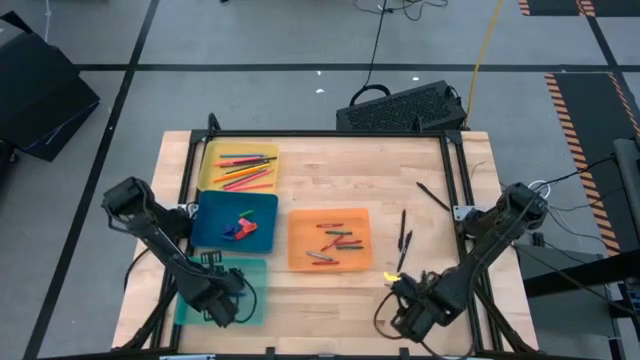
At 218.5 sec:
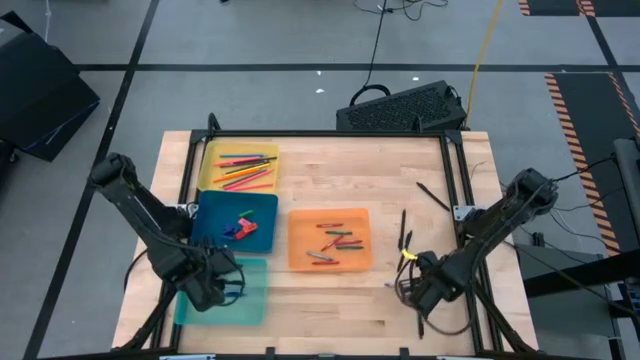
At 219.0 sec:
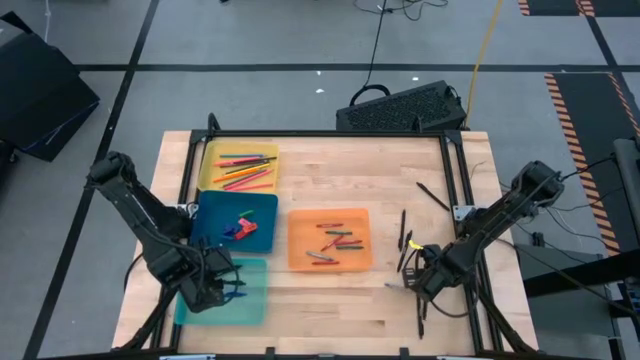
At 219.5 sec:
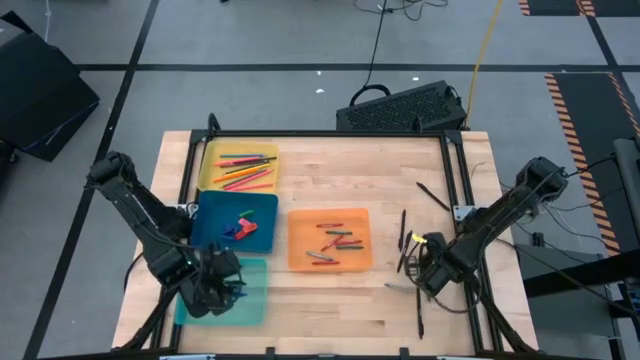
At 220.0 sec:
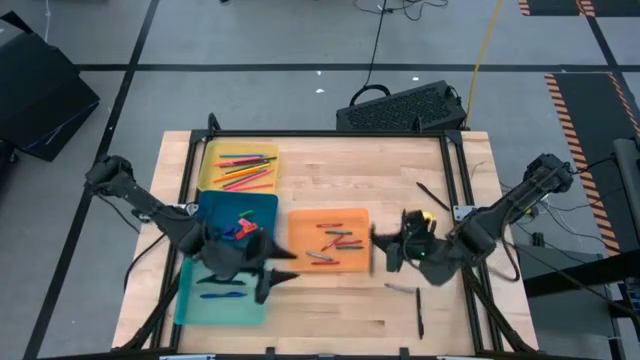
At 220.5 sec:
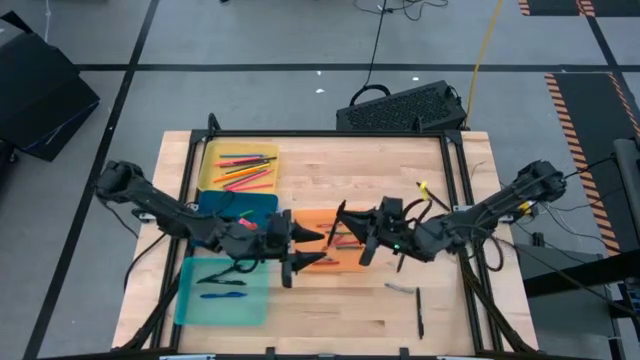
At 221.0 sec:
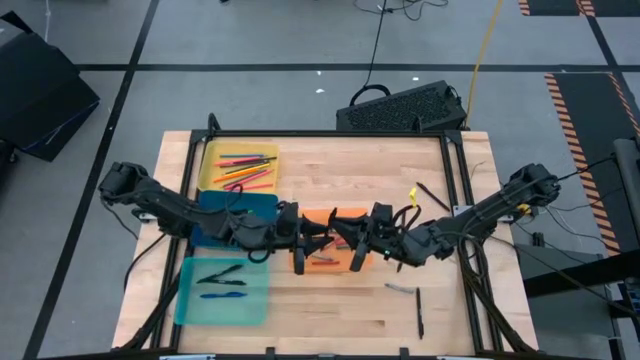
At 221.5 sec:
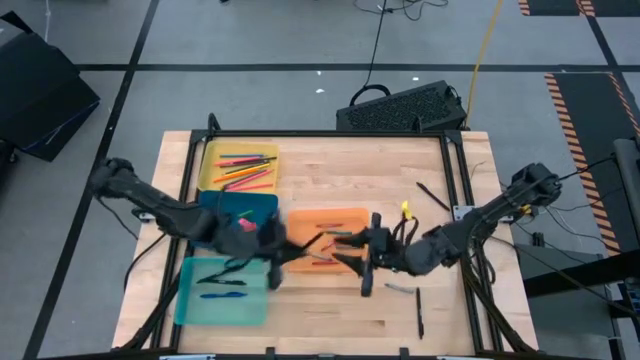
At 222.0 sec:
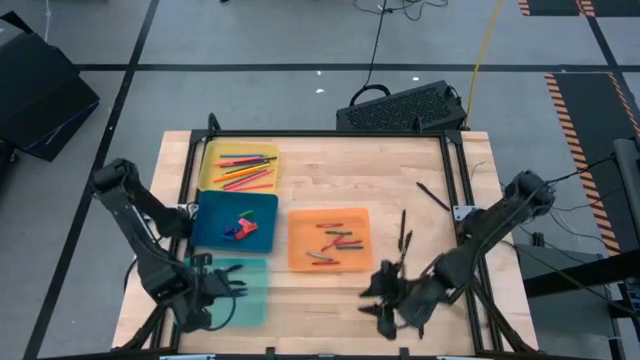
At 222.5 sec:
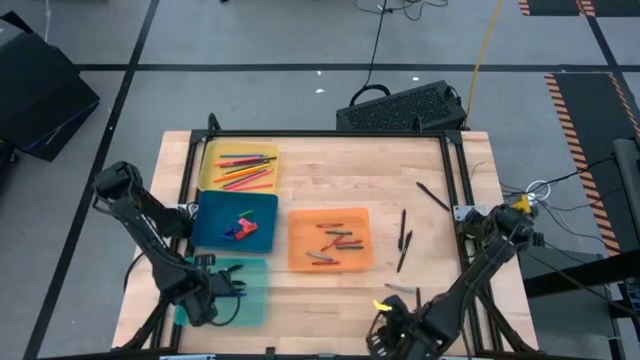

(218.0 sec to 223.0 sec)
Task: Sort crayons/erasers/pens/pencils in bins
Put the black pen into the green bin

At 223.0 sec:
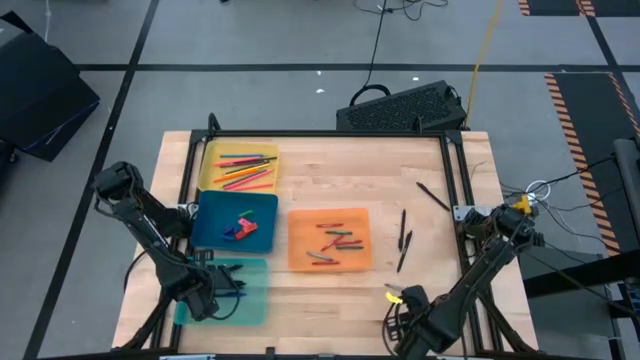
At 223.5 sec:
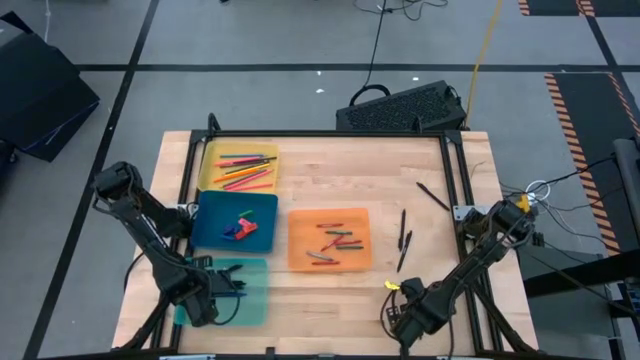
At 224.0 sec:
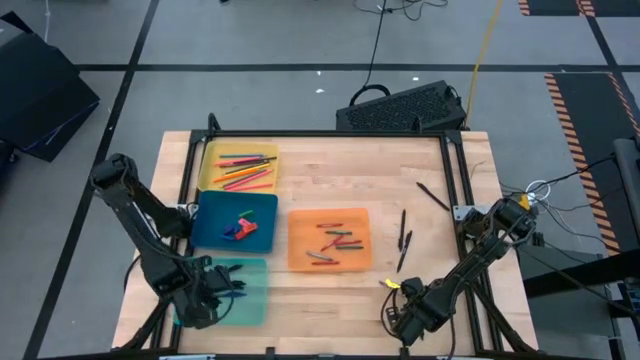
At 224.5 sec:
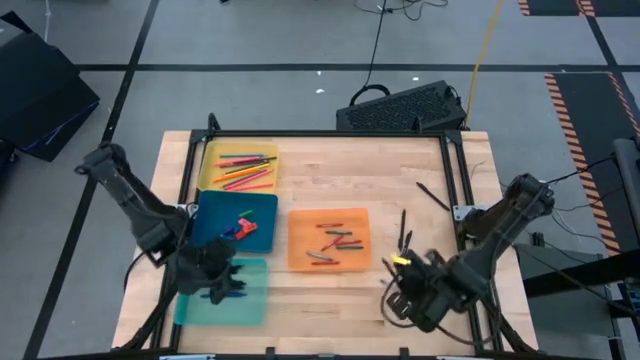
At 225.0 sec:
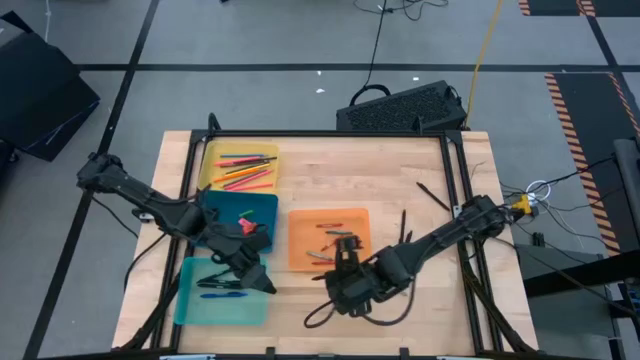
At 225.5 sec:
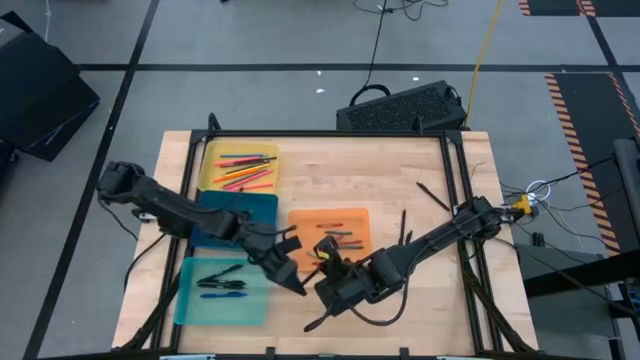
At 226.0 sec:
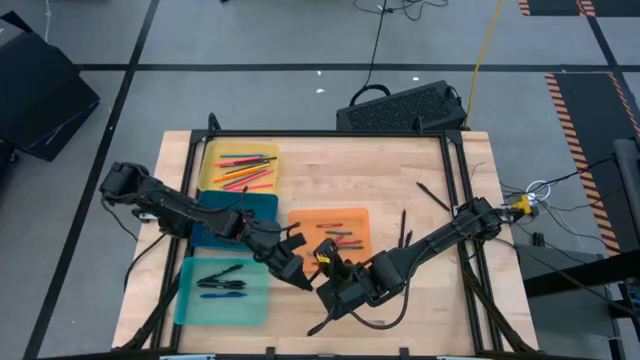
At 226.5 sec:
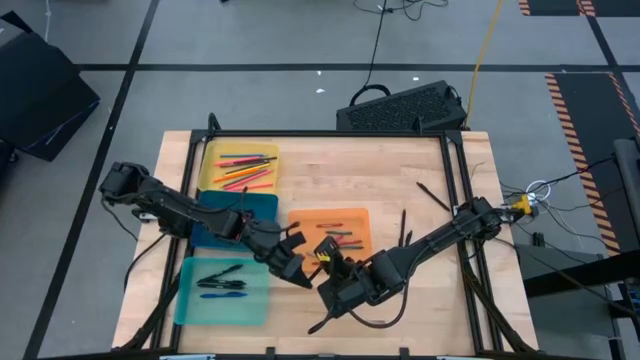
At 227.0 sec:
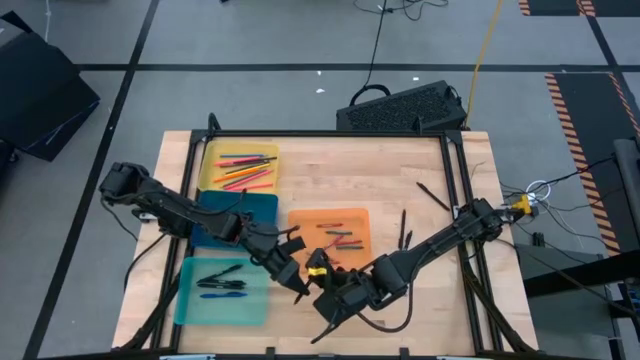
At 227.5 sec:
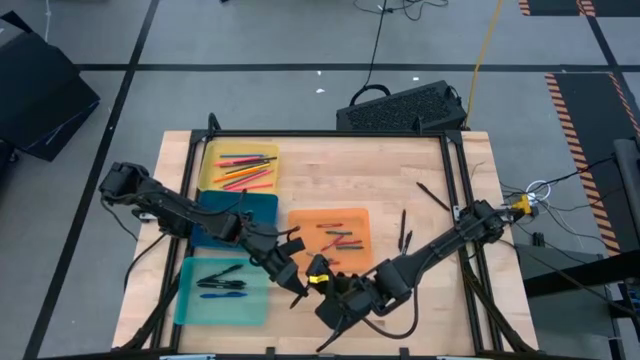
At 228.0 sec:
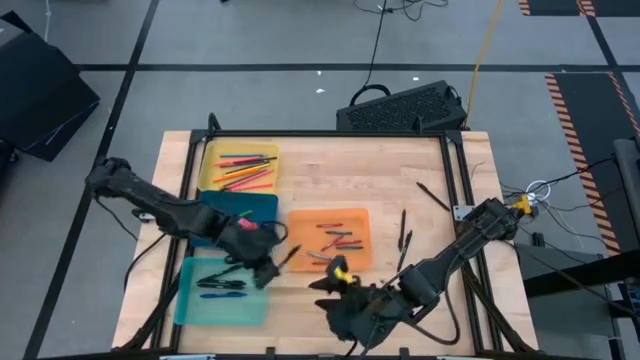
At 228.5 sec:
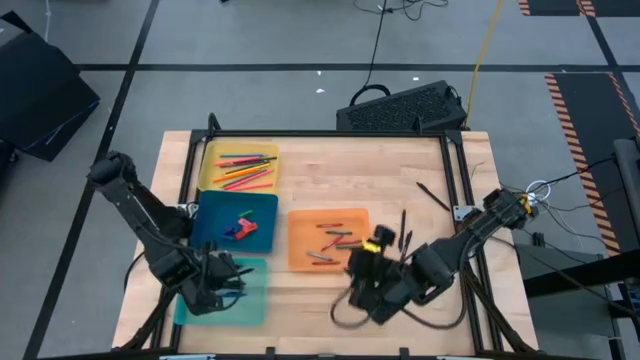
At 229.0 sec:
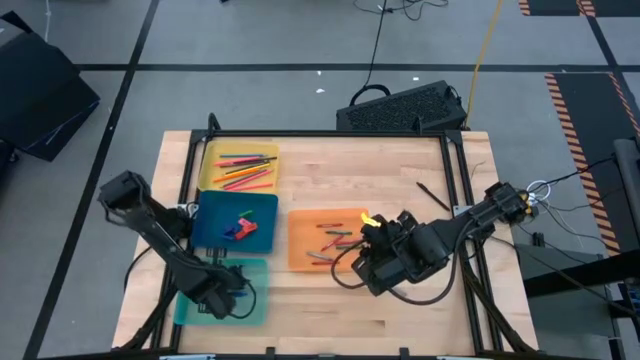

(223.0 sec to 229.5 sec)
Put the black pen into the green bin

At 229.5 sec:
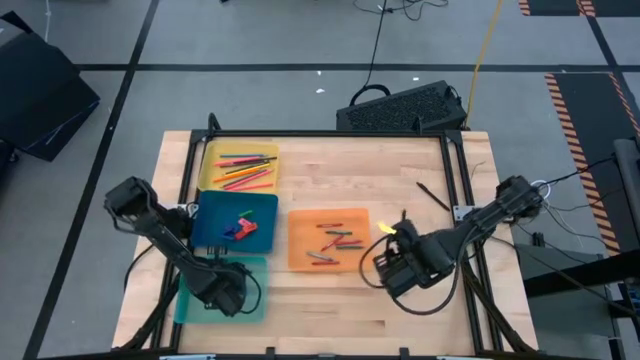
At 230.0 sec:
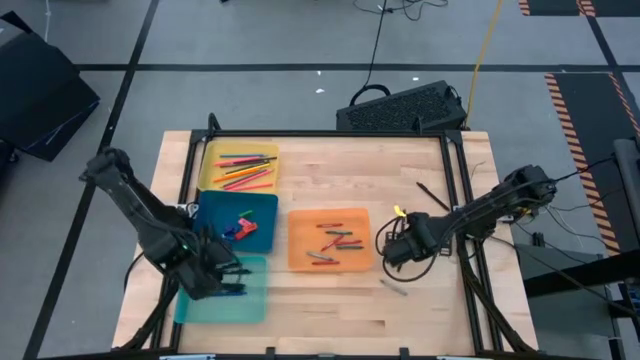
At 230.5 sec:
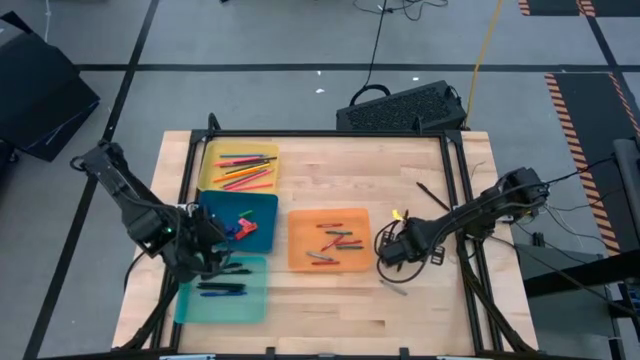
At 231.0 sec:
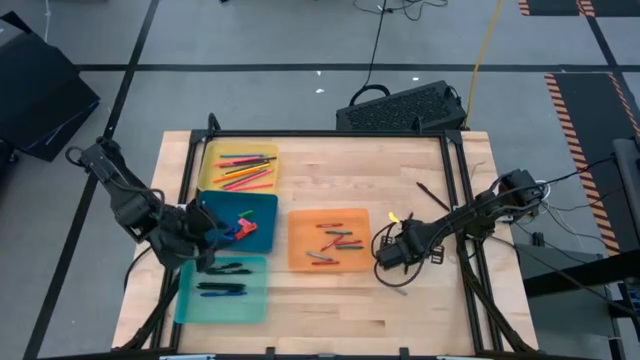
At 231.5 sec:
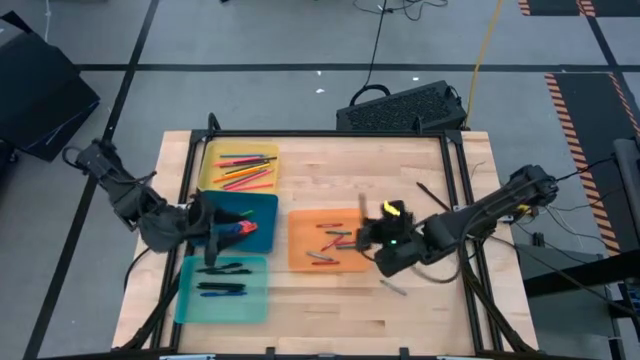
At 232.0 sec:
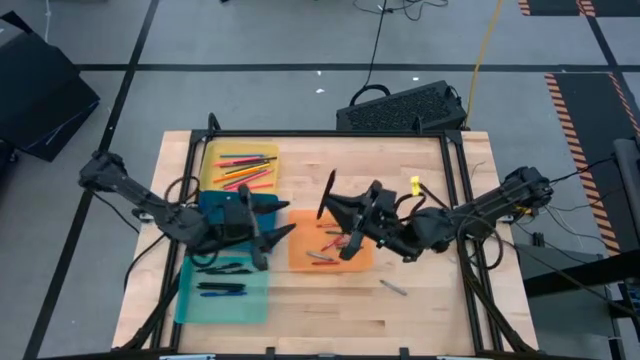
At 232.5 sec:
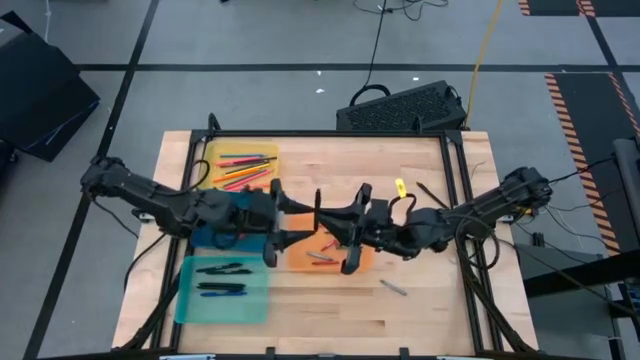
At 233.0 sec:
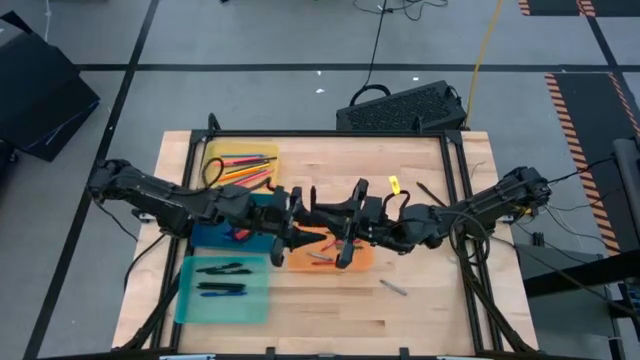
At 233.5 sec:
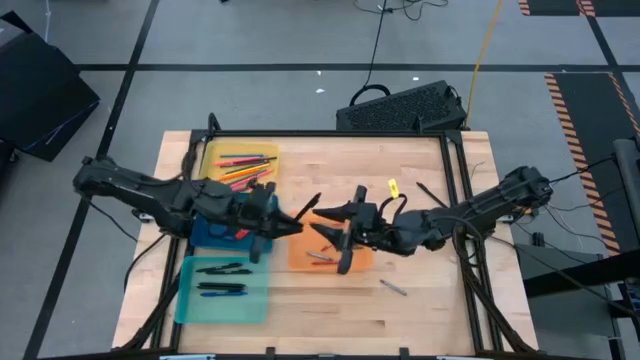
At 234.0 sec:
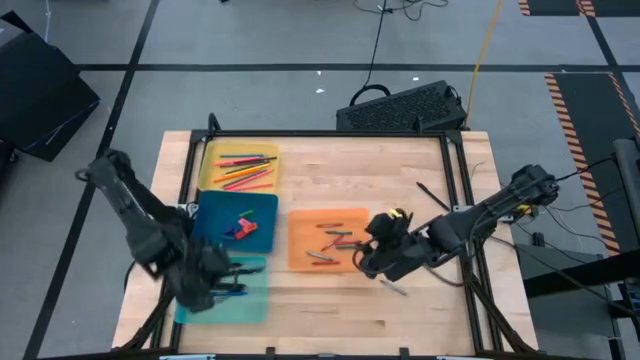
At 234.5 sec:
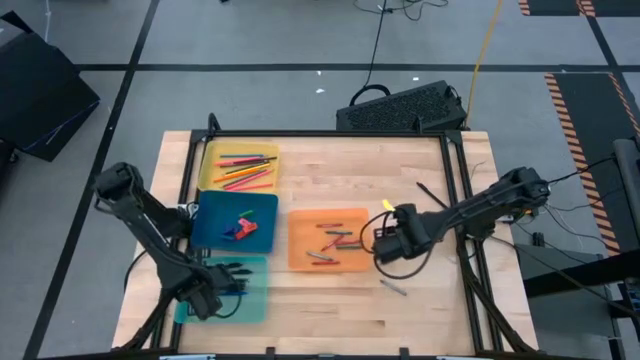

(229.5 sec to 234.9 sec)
Put the black pen into the green bin

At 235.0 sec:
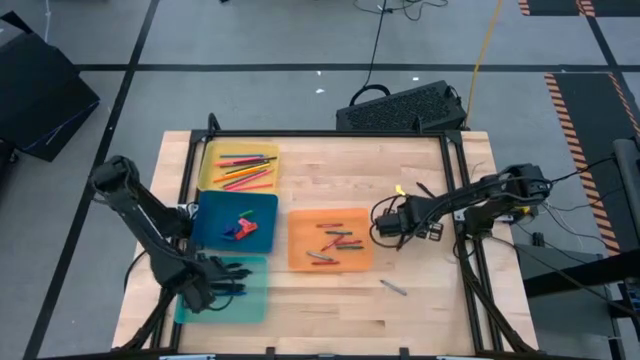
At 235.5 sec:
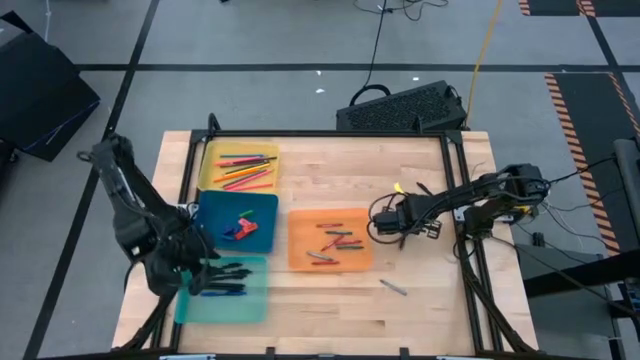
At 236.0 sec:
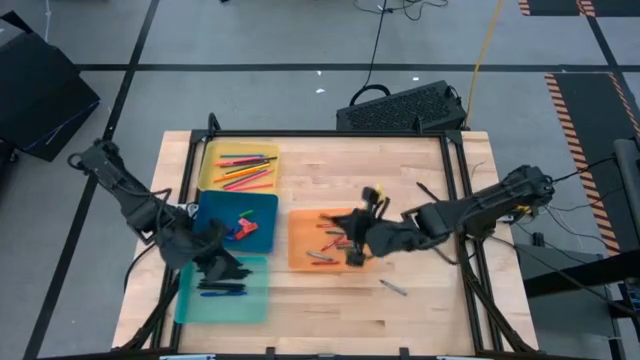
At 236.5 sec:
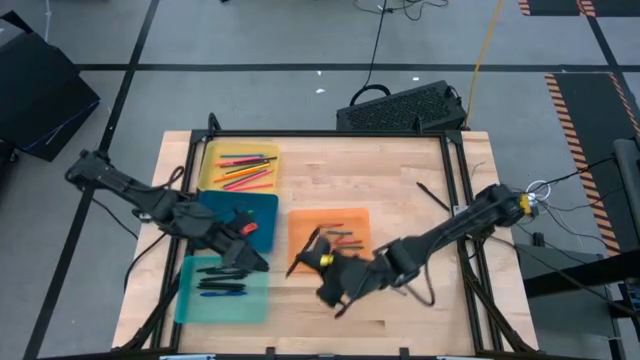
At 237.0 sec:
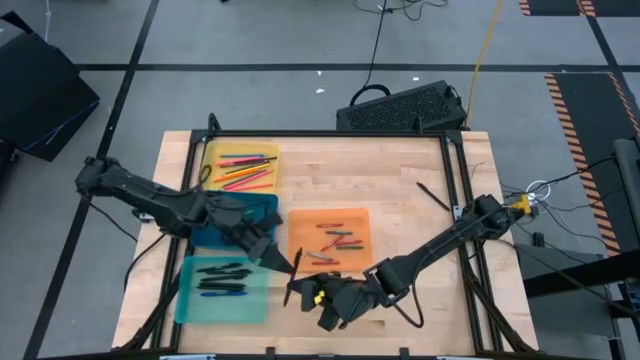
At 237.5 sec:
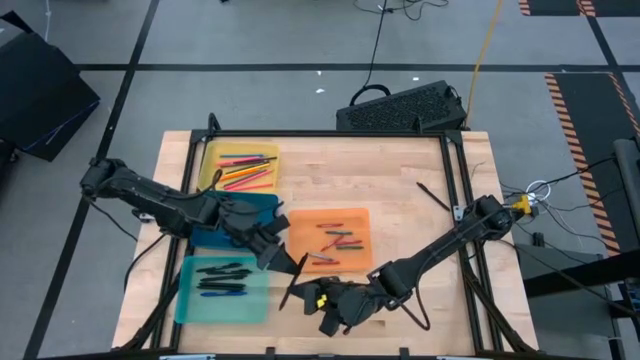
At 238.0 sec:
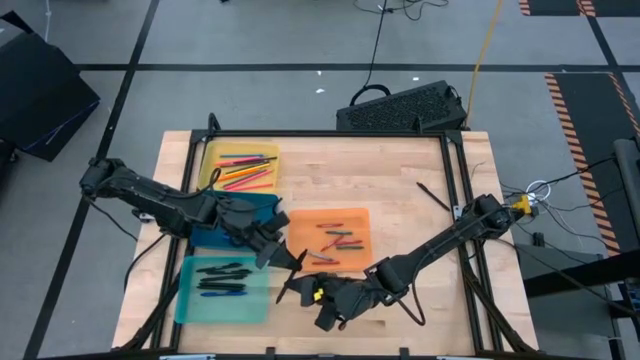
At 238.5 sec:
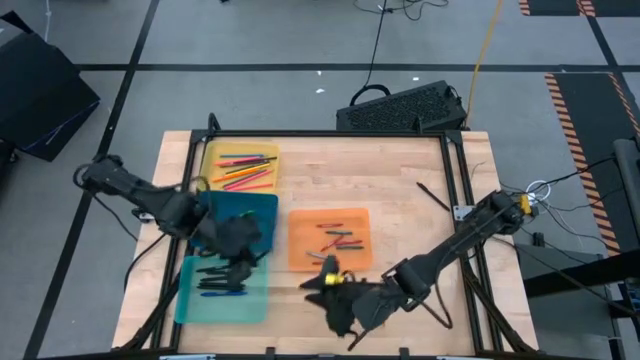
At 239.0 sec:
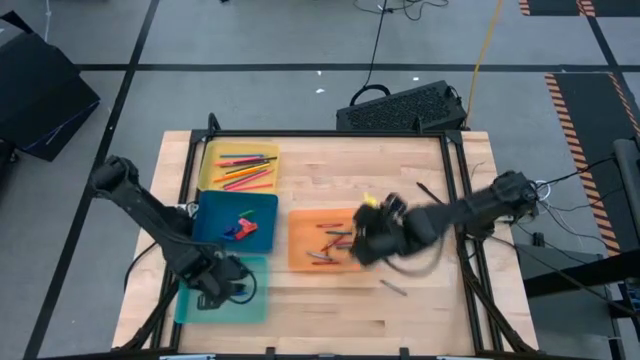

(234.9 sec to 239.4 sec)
Put the black pen into the green bin
